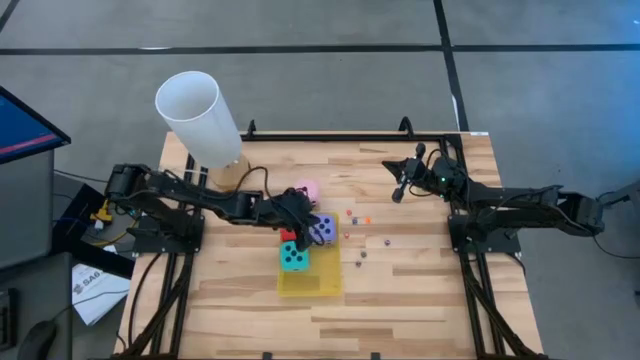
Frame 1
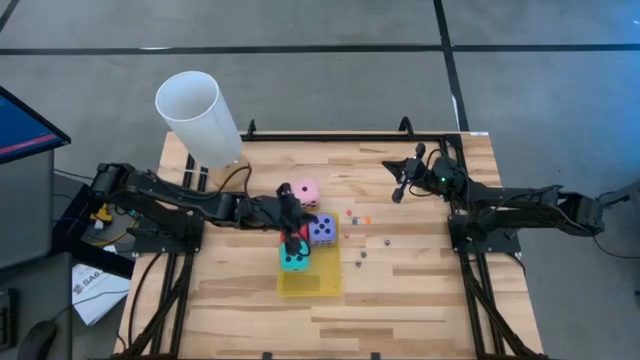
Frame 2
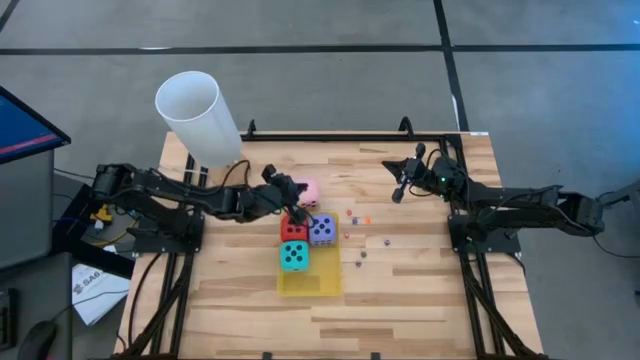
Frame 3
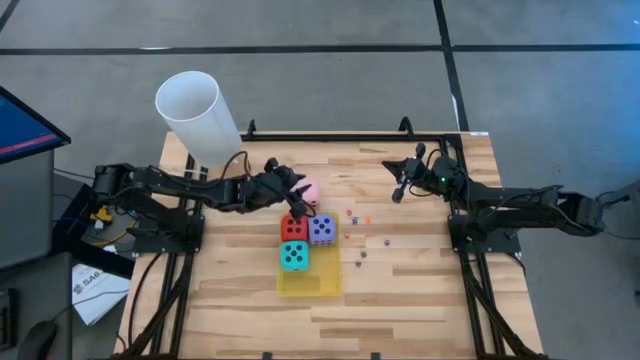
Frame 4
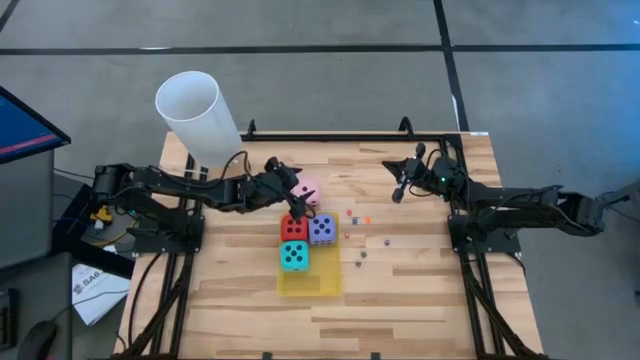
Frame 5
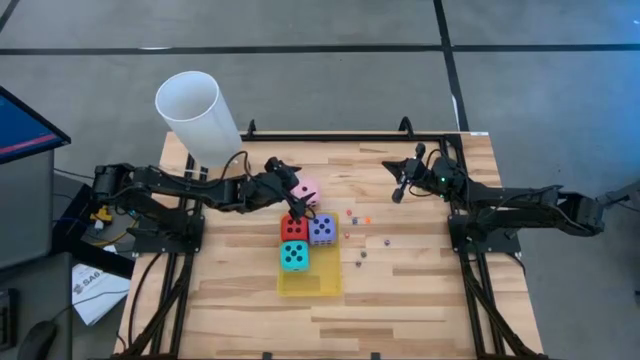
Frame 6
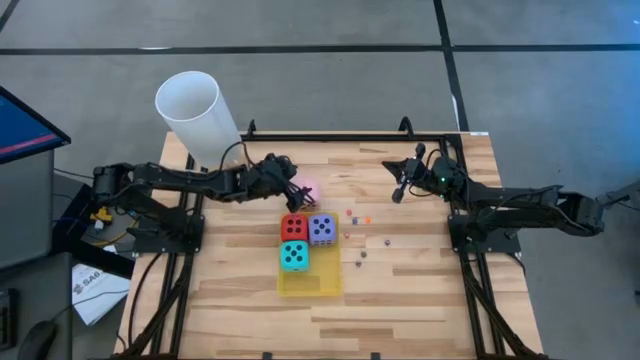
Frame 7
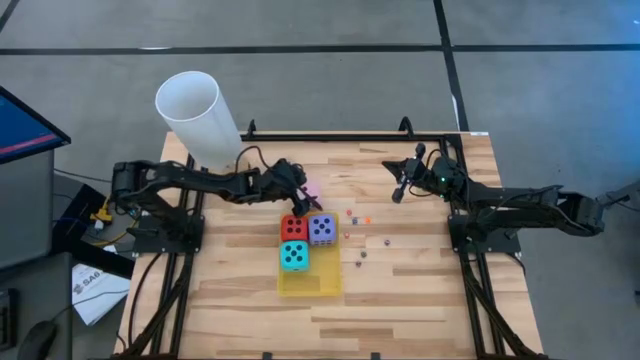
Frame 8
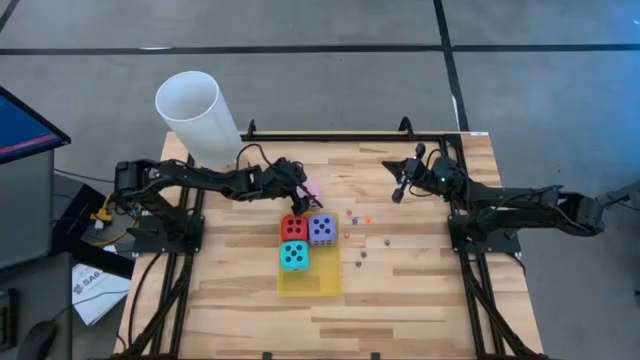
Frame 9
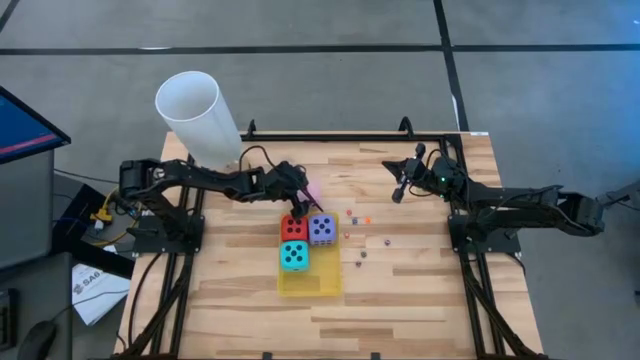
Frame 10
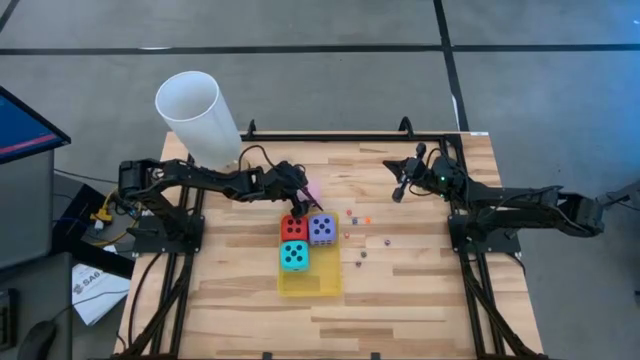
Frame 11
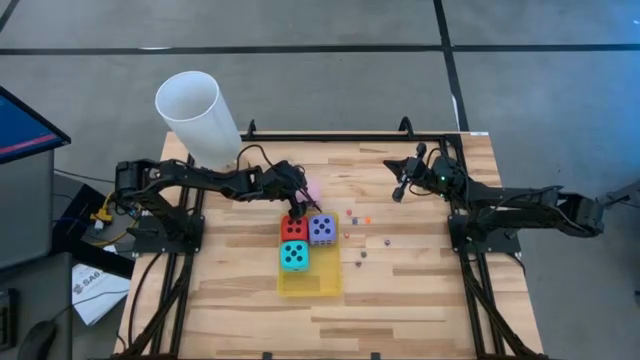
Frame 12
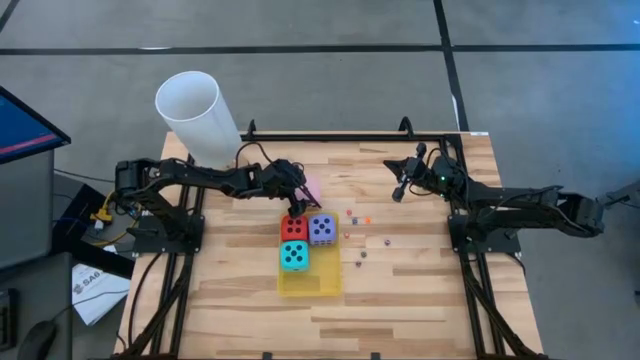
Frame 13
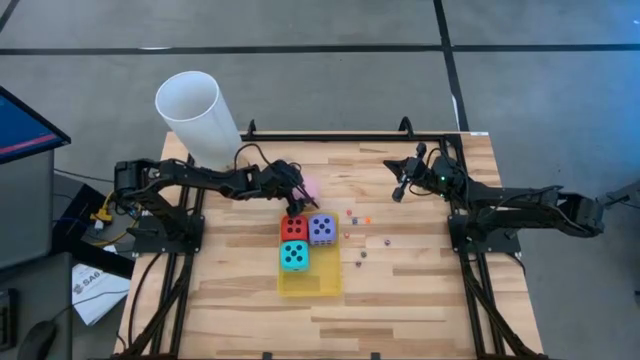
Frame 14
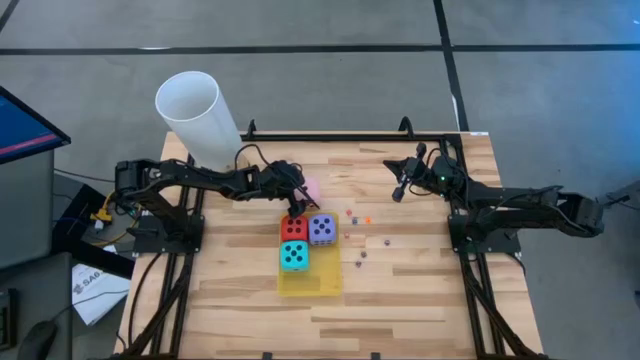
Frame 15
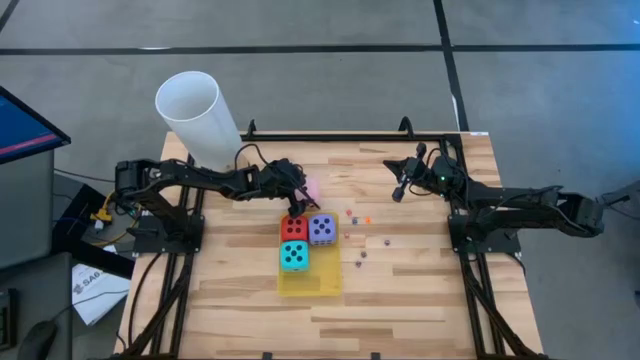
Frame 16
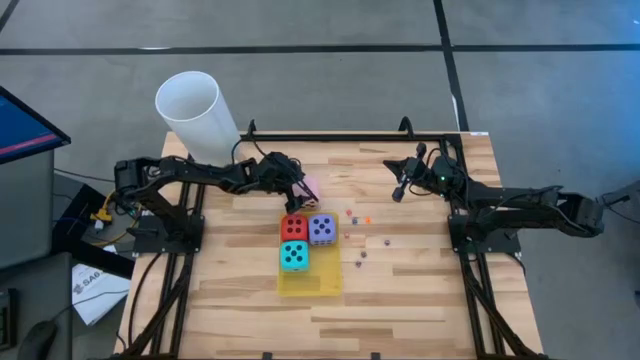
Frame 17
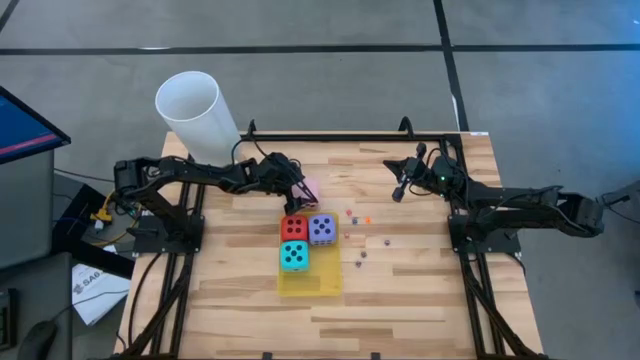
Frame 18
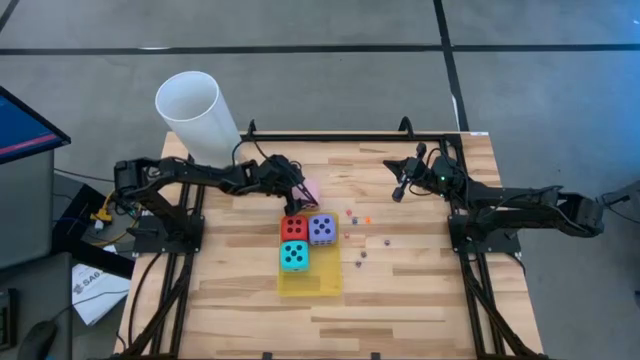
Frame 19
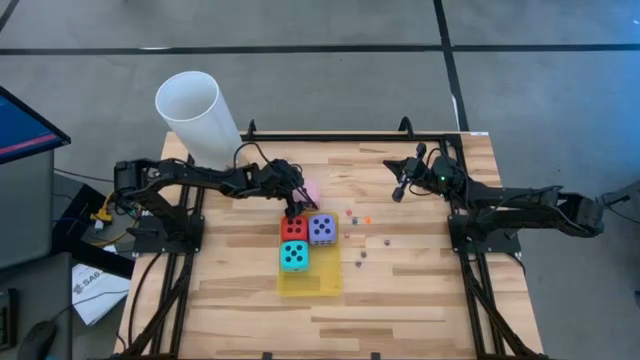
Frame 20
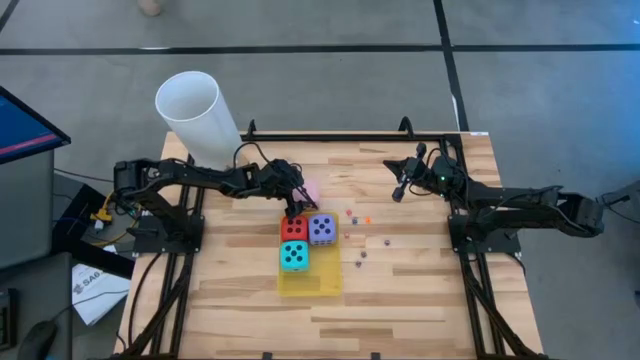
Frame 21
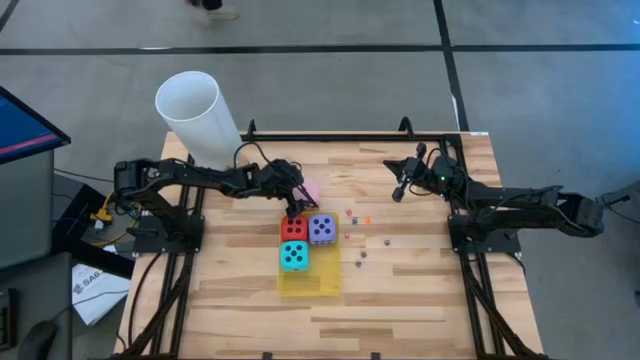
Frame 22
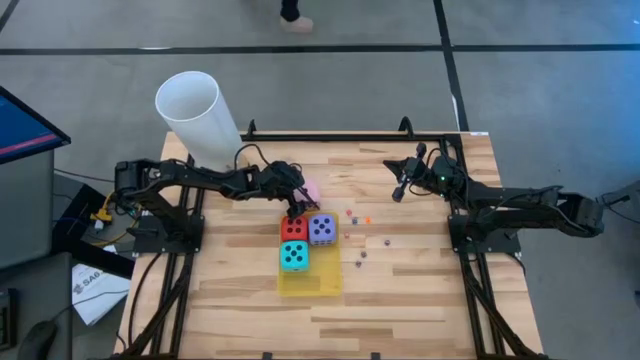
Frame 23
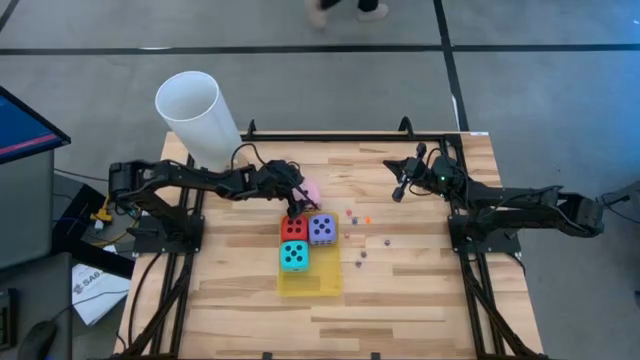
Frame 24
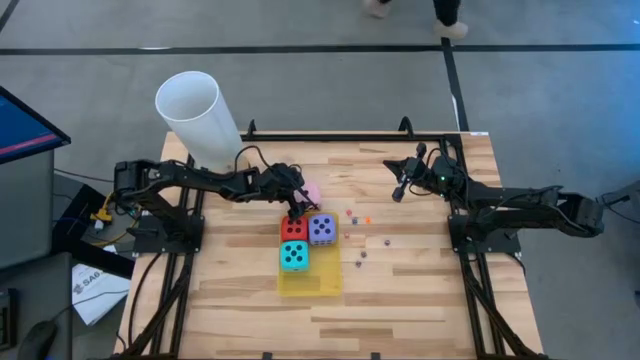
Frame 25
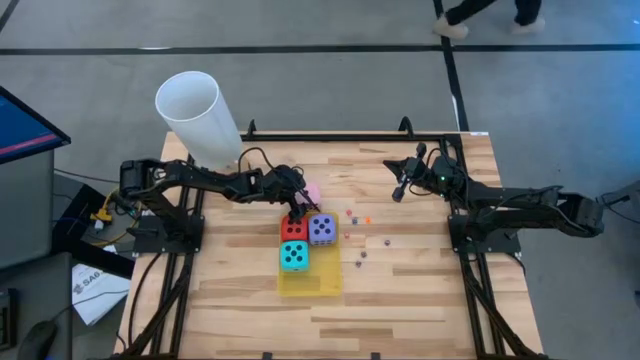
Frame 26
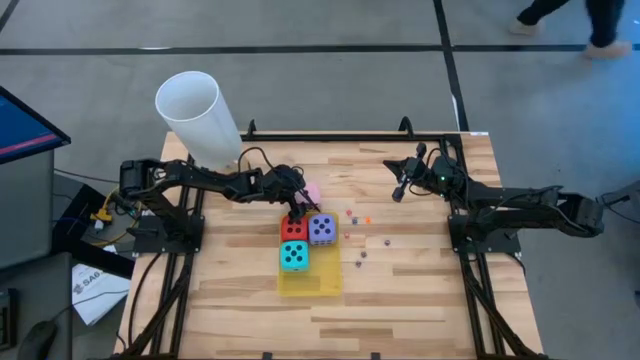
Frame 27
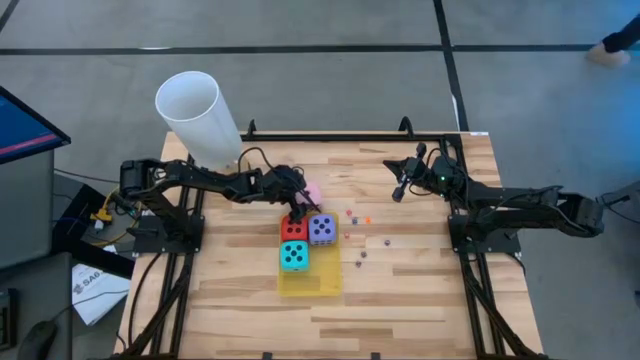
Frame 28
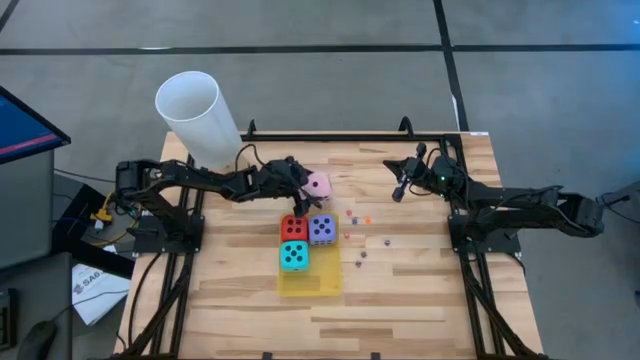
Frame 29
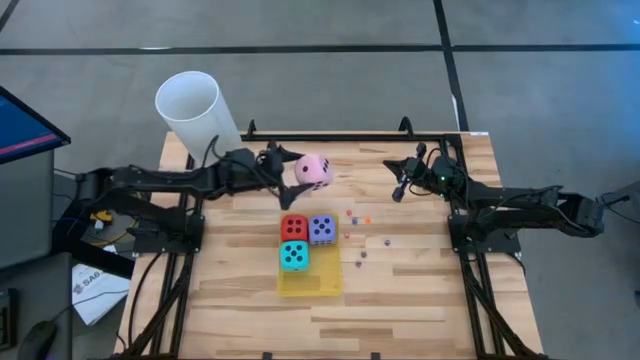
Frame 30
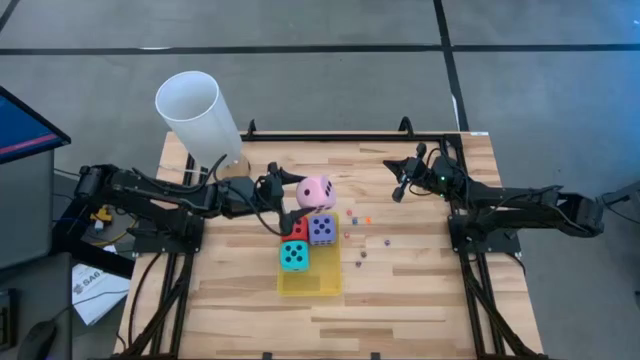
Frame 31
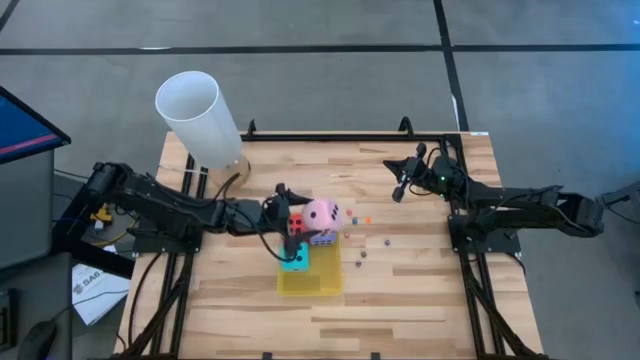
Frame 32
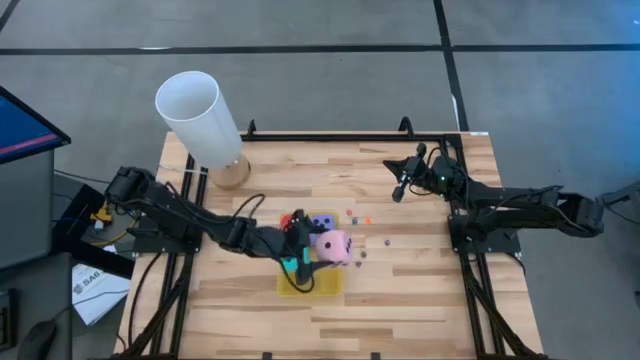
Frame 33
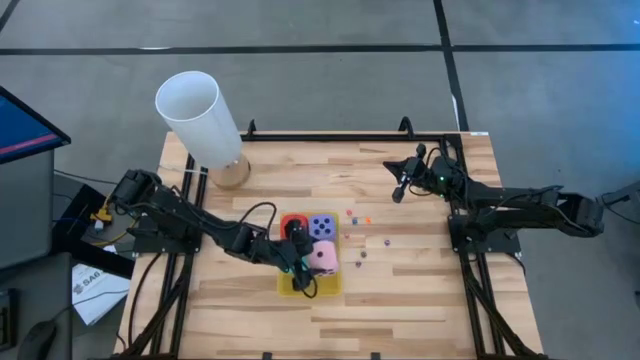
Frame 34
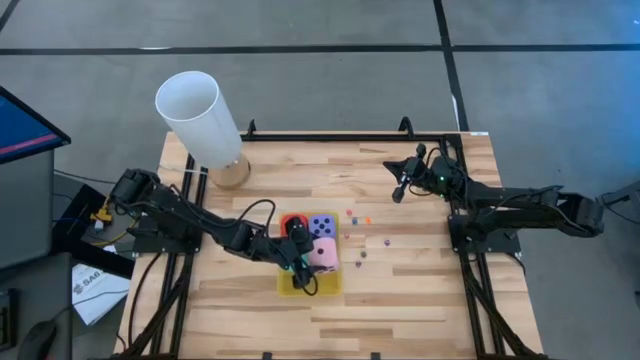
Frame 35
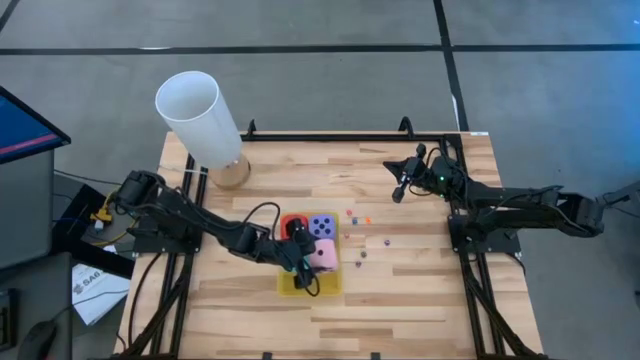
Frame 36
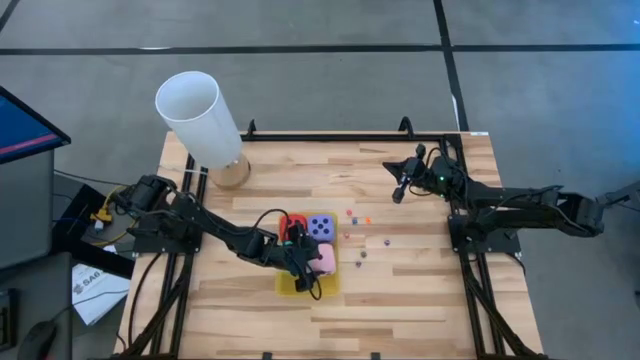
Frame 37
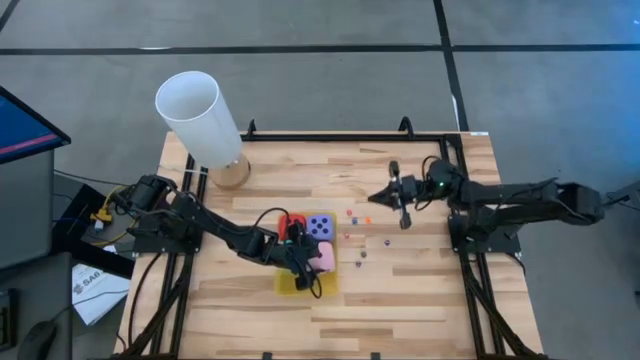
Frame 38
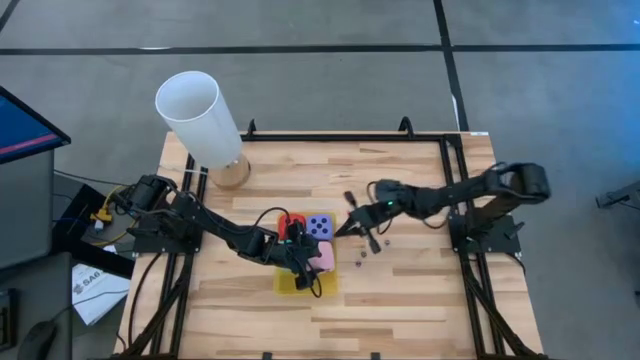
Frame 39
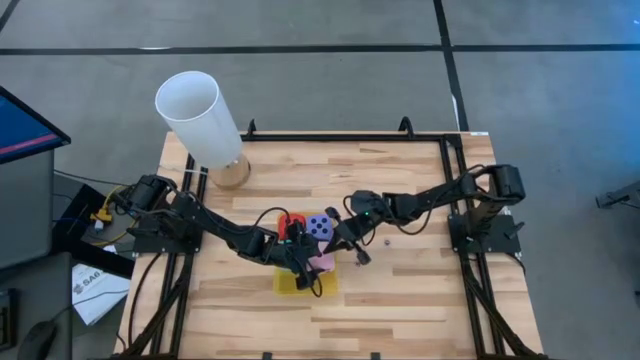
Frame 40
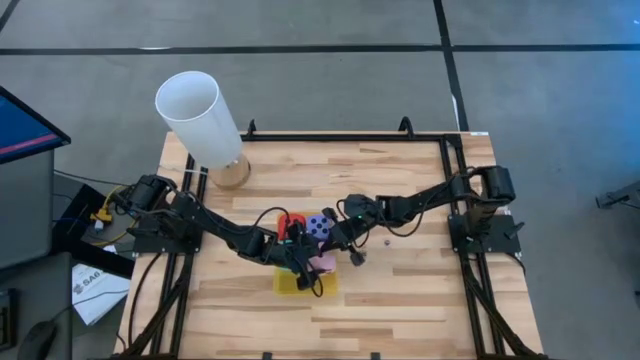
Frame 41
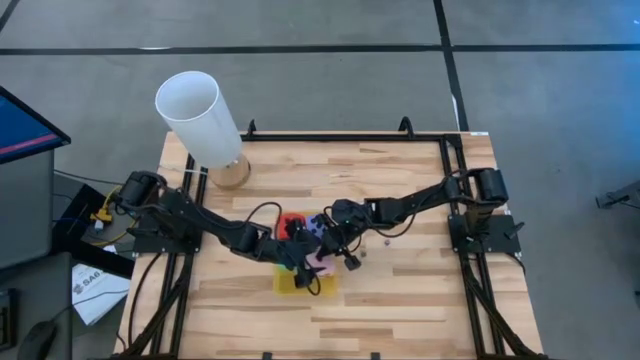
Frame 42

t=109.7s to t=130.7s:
Task: Pick & Place Dice
Put the pink die into the yellow bin
